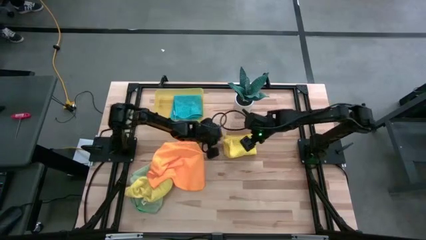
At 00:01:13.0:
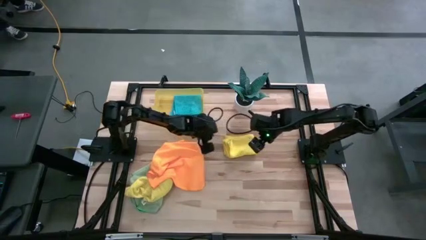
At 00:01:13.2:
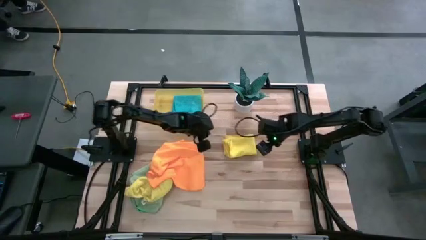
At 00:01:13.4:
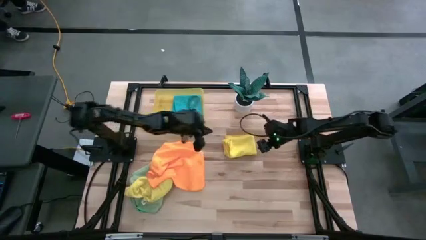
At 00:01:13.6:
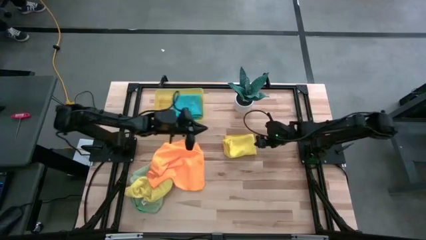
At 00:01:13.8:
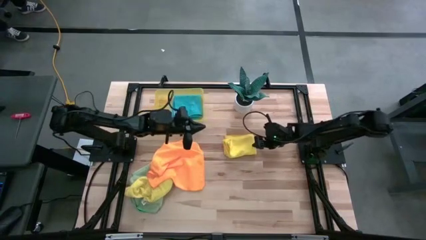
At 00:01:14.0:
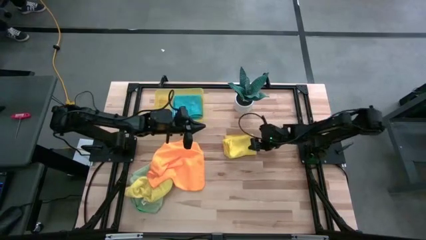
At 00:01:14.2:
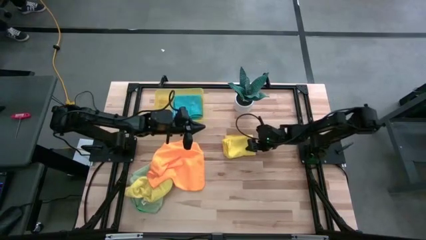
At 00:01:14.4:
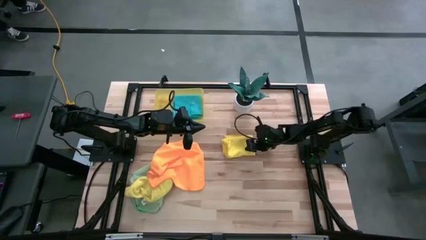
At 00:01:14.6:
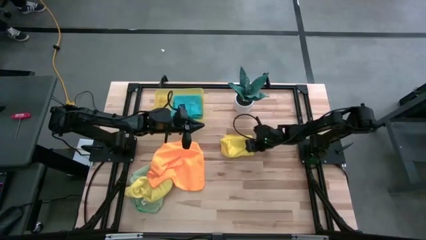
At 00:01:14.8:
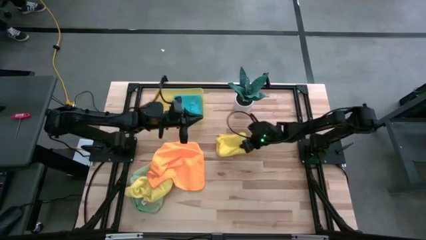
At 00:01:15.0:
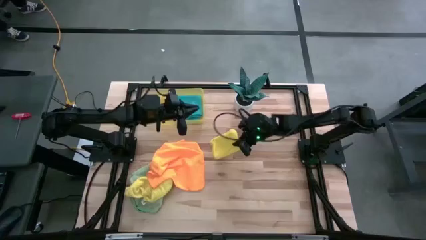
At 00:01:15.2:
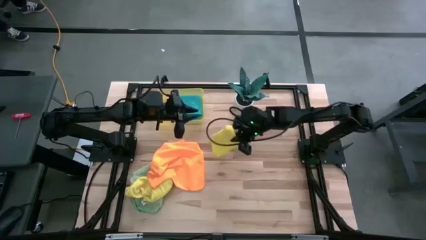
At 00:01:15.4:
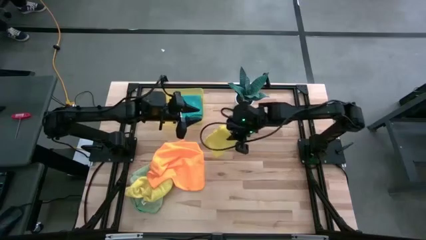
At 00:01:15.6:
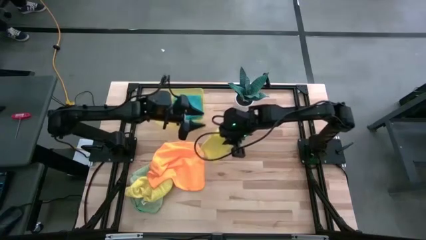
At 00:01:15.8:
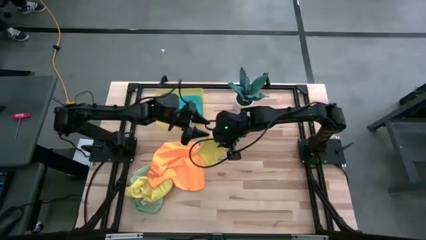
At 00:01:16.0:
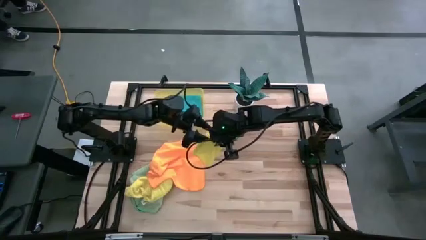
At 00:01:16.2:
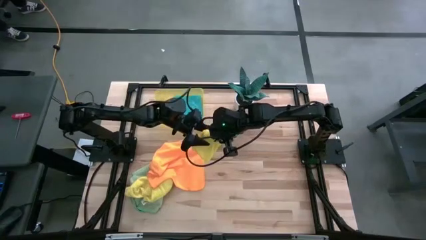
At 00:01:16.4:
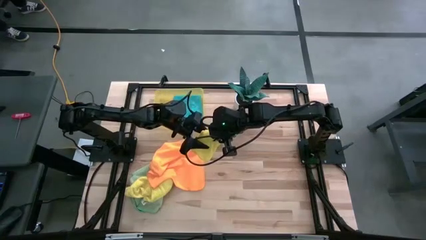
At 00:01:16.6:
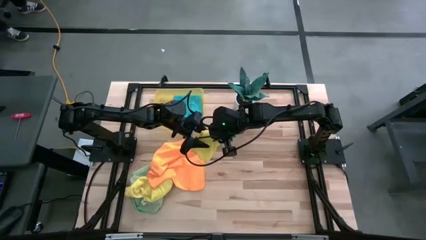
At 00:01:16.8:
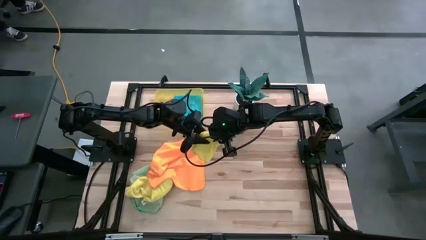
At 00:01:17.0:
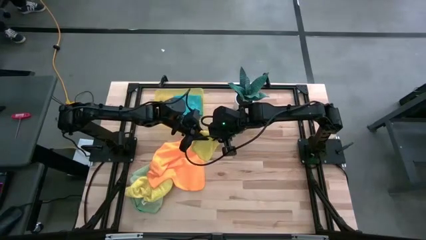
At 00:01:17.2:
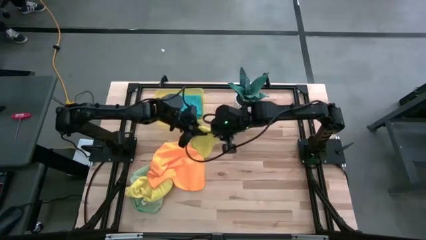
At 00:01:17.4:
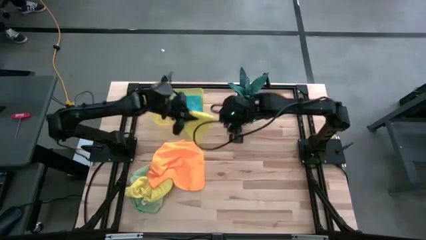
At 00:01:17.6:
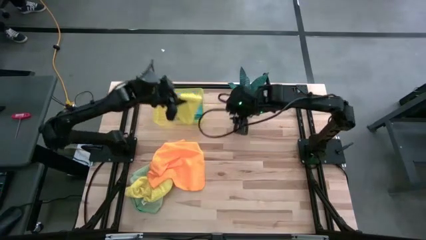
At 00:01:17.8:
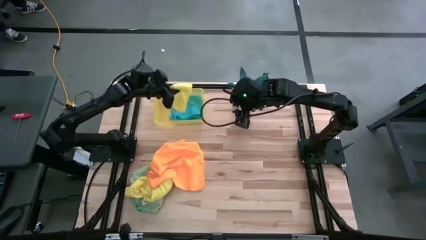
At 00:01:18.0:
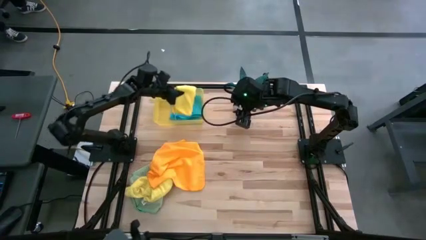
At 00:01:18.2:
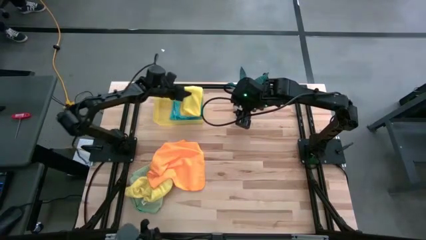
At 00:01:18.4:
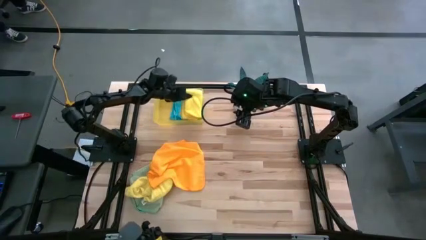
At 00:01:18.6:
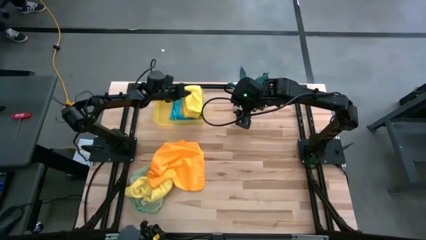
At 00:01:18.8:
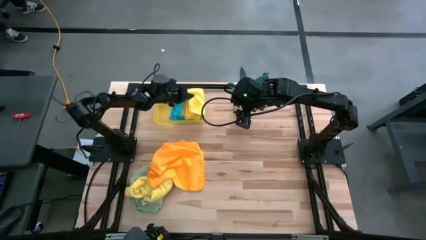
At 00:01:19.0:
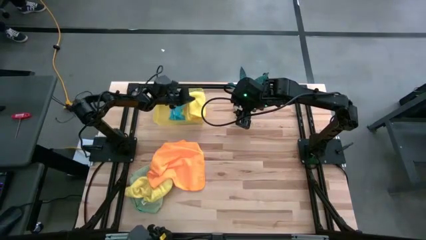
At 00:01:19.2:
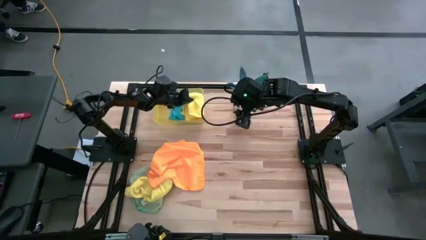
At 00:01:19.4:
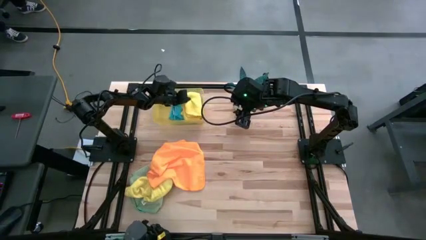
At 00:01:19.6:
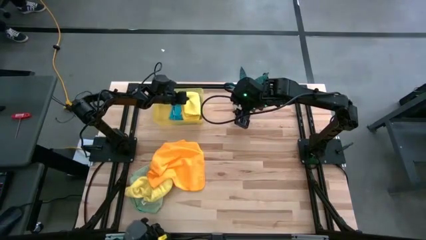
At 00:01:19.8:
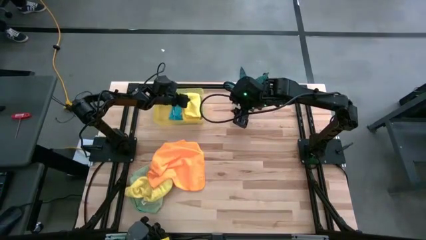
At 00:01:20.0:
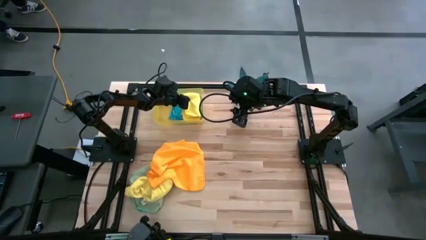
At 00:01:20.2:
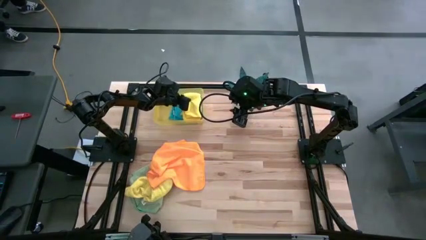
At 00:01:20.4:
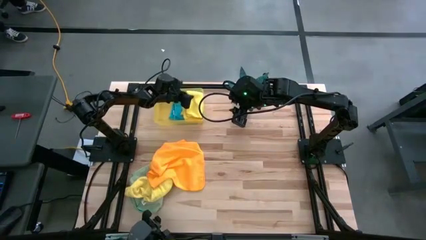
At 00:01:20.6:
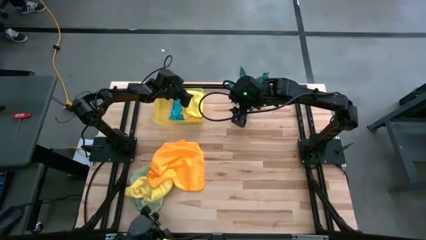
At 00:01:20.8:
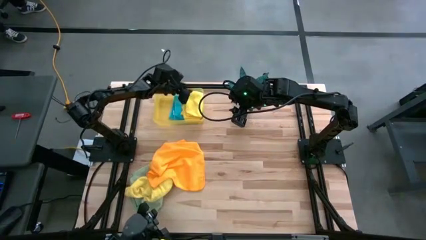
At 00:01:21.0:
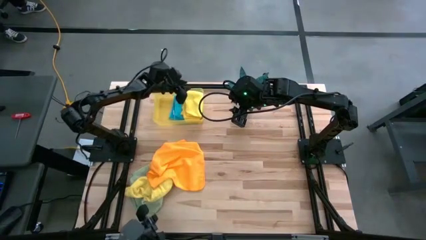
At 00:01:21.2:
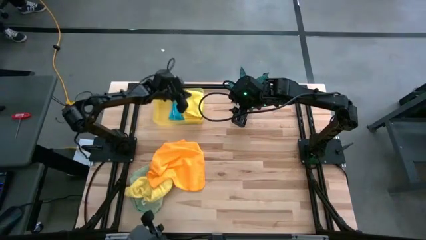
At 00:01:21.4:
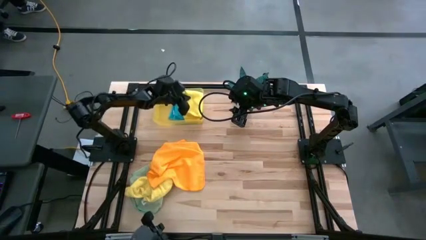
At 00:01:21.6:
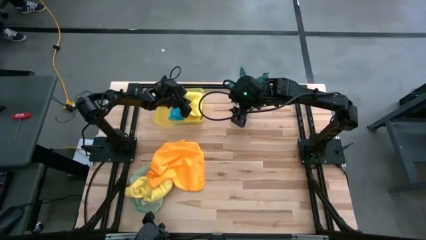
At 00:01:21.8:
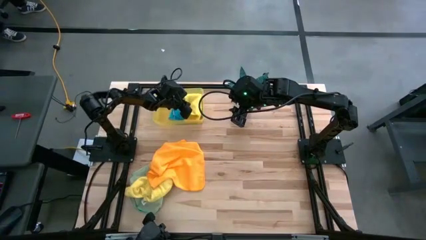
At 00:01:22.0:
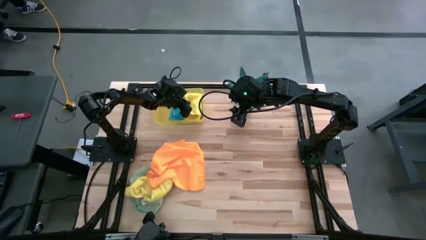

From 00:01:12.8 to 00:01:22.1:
Task: Fold microfiber towels
Stack the folded yellow microfiber cloth on top of the folded blue microfiber cloth in the bin
